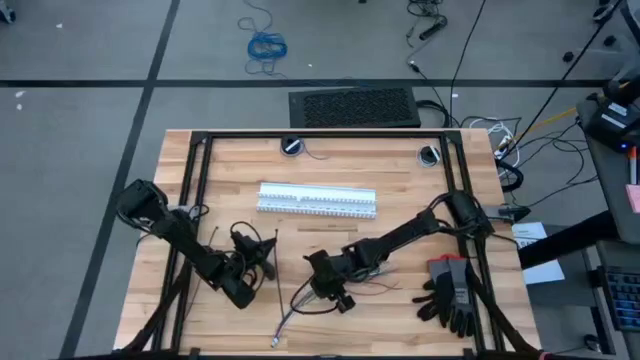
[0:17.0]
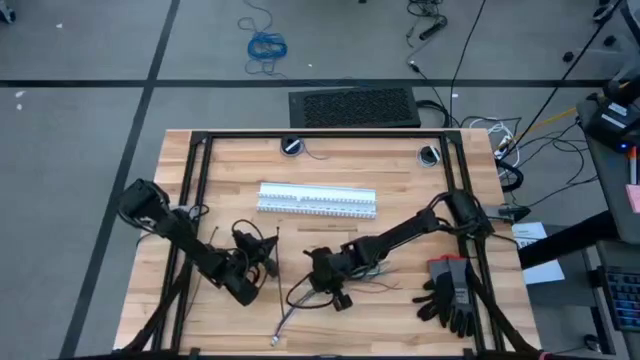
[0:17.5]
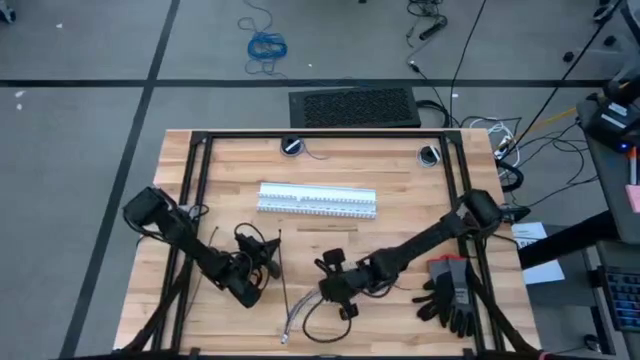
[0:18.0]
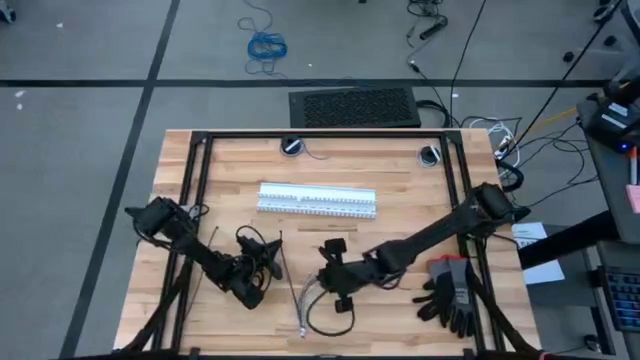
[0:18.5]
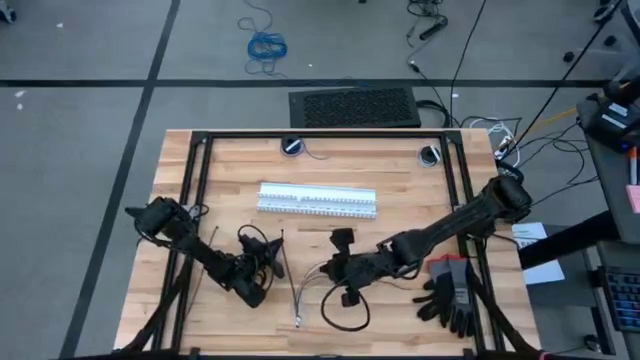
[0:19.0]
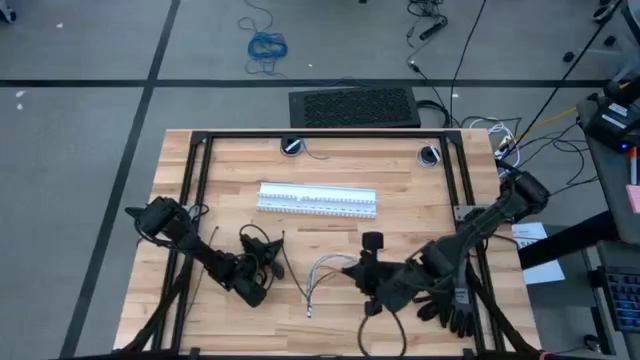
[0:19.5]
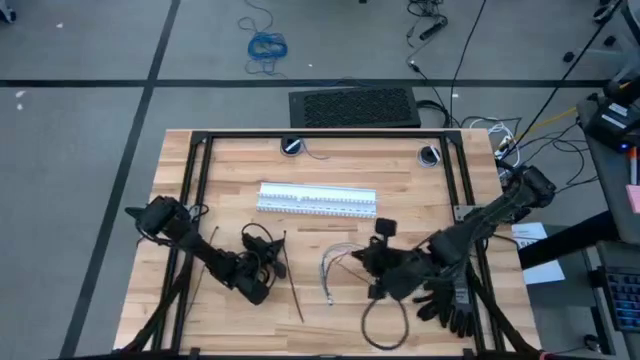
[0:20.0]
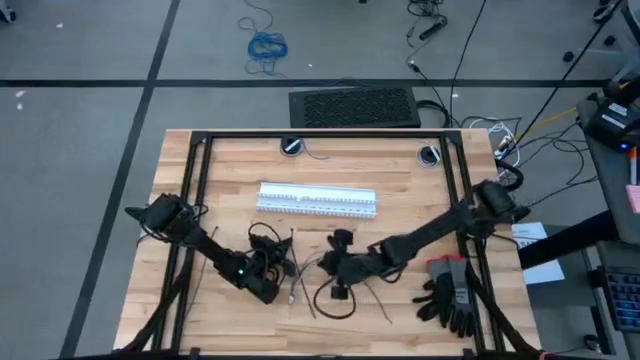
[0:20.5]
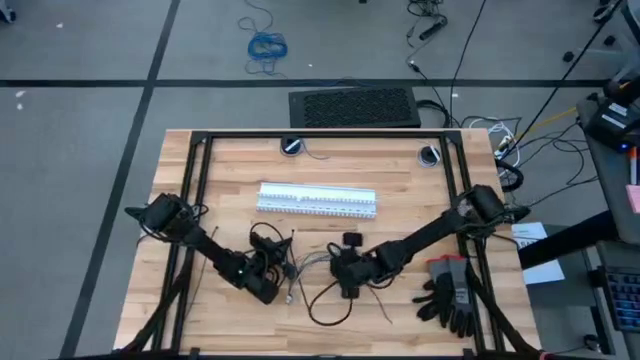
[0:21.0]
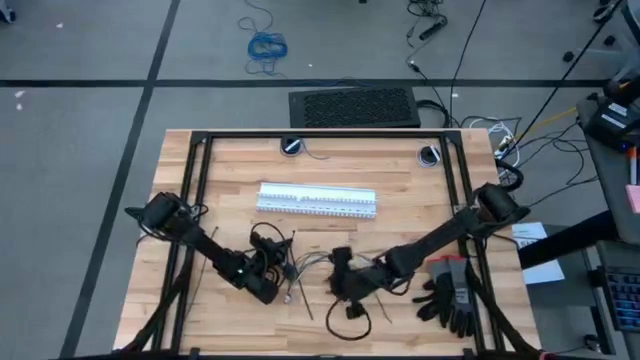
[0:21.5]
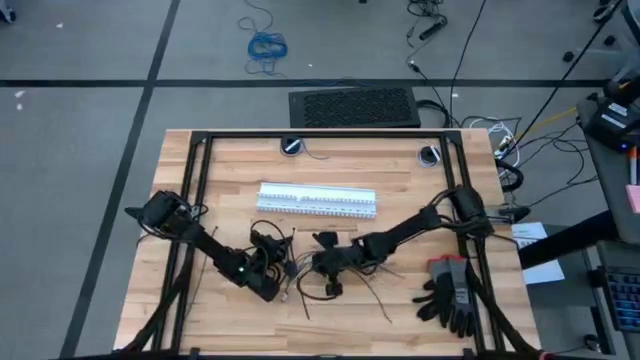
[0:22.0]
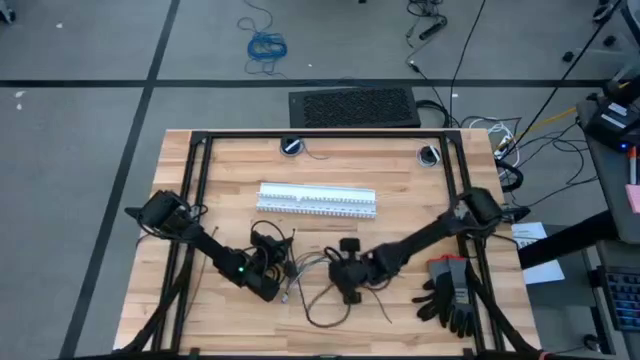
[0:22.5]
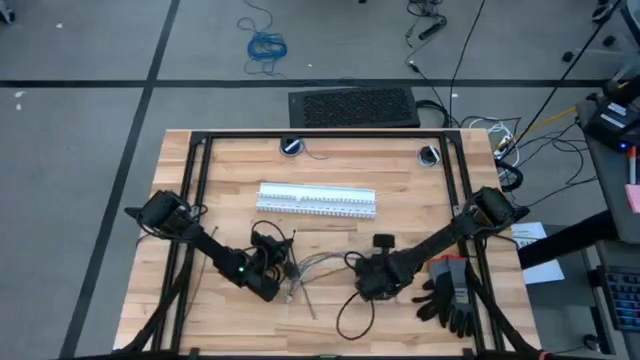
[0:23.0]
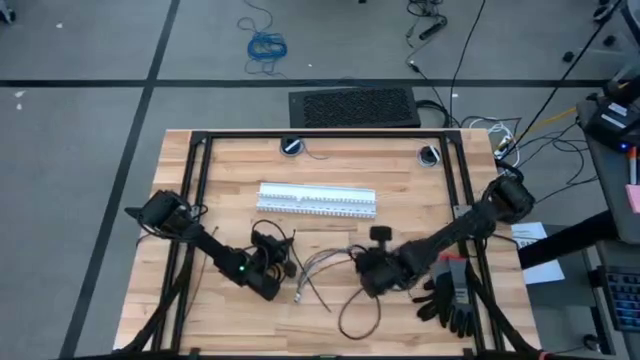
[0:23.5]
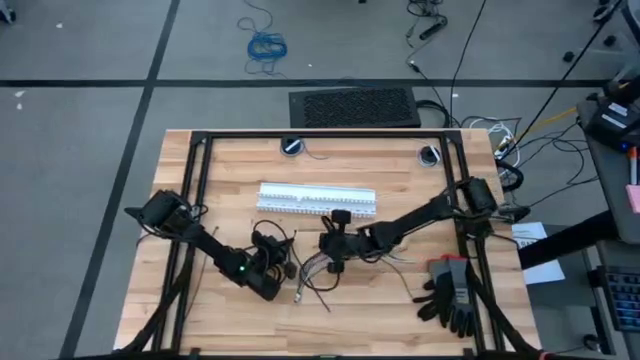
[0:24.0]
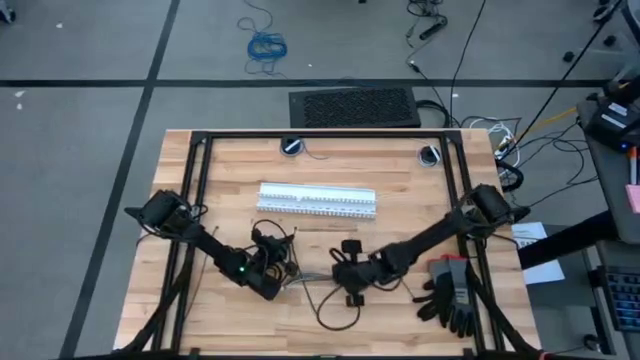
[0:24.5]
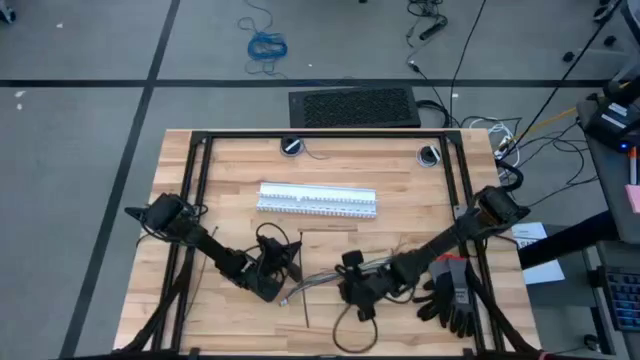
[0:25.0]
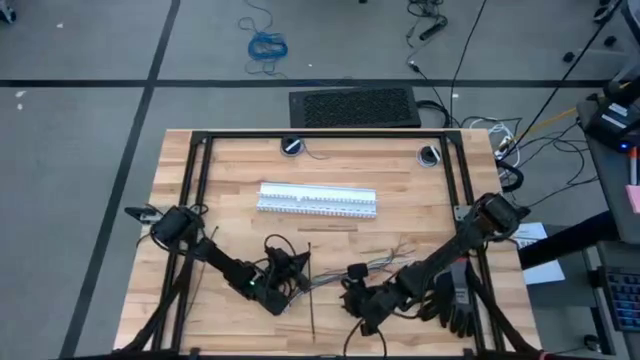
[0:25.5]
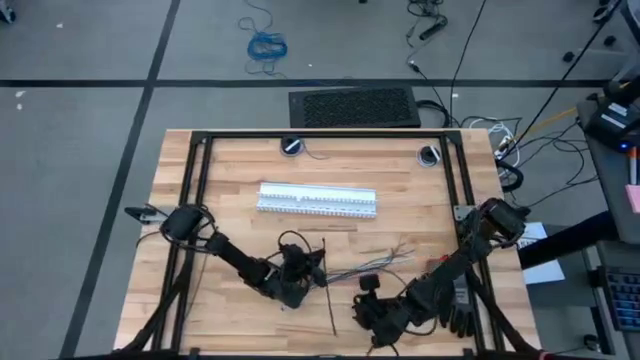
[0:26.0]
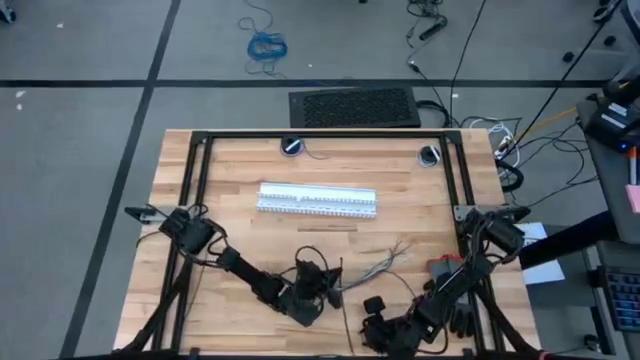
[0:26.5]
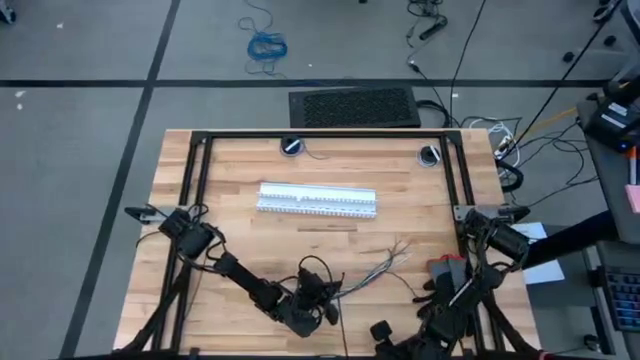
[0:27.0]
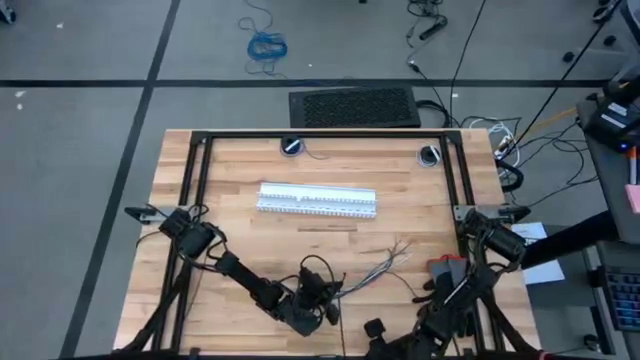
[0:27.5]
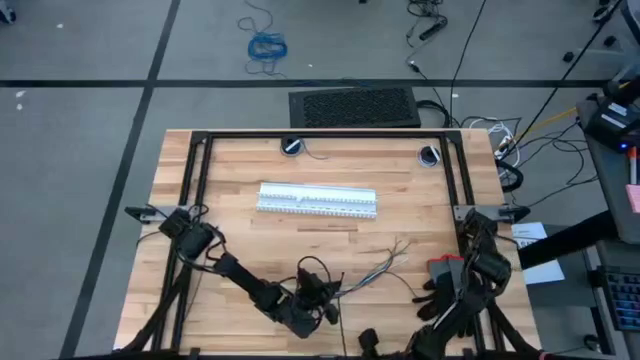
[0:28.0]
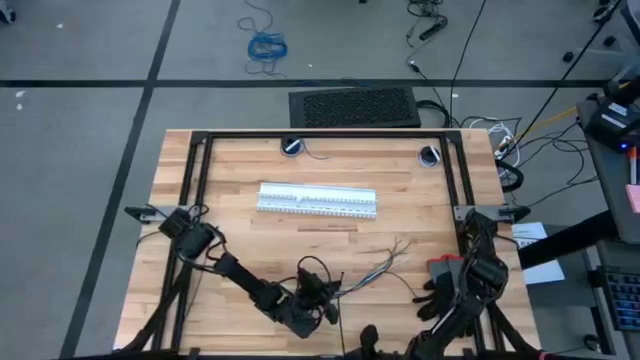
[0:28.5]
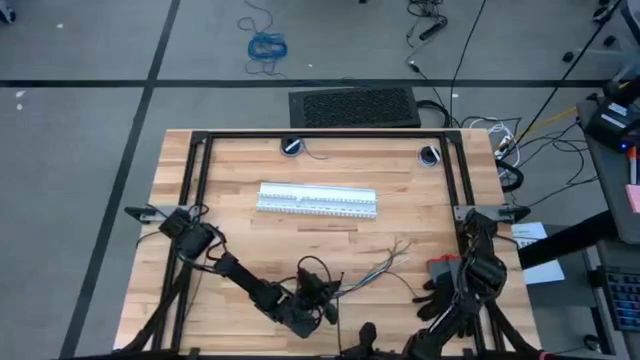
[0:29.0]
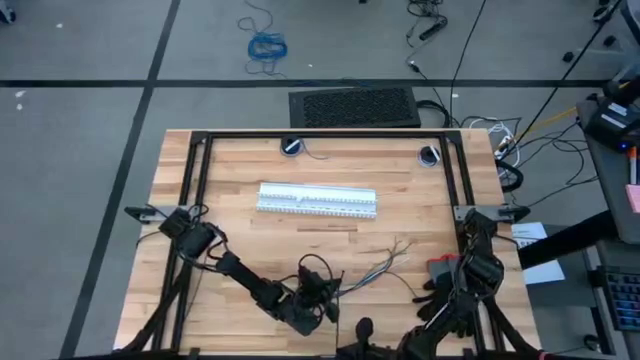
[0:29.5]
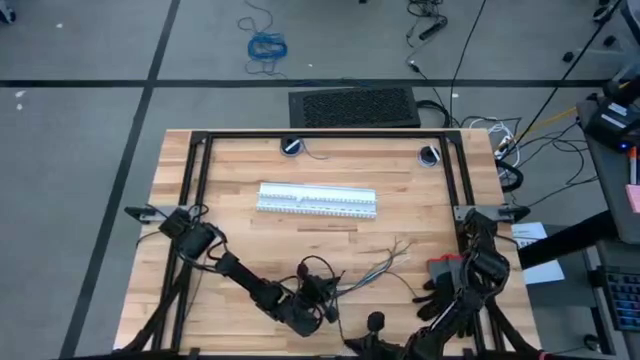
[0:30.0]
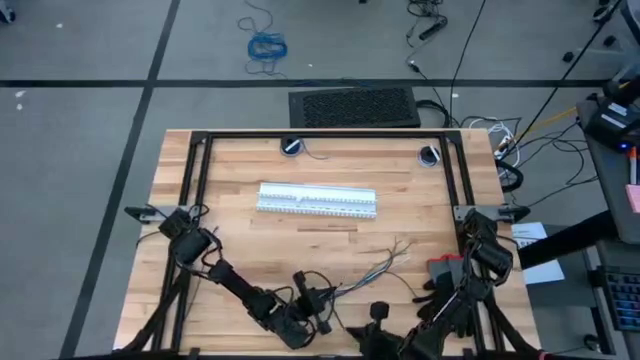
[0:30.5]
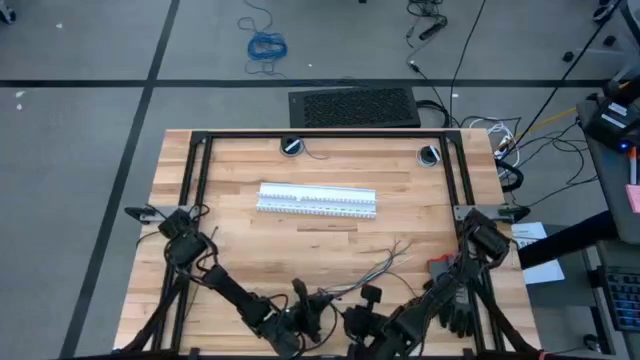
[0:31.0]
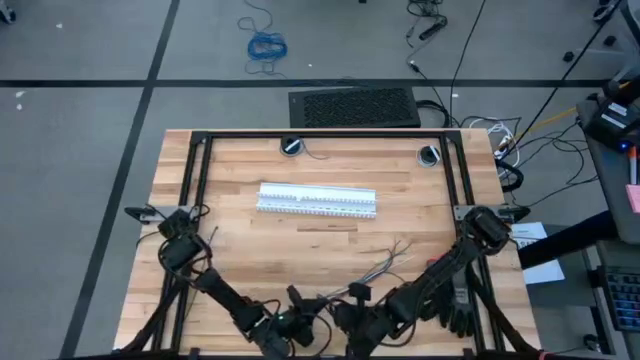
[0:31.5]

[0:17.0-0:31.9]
Task: Ziptie cables
Wrap the cables together using a zip tie

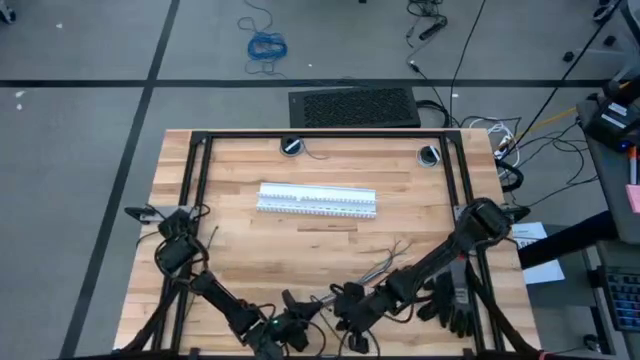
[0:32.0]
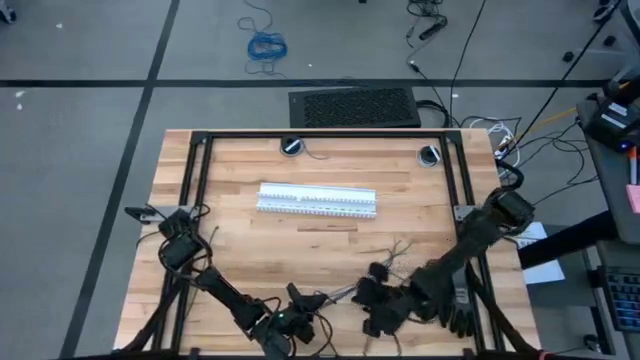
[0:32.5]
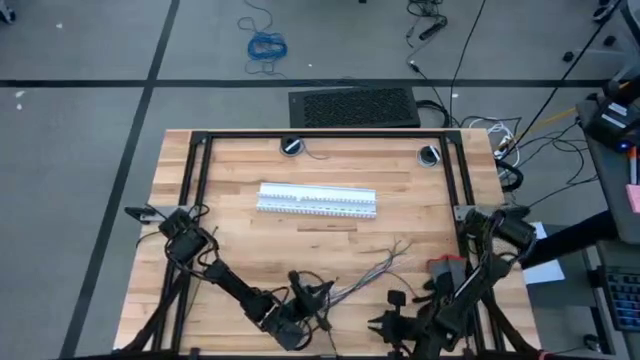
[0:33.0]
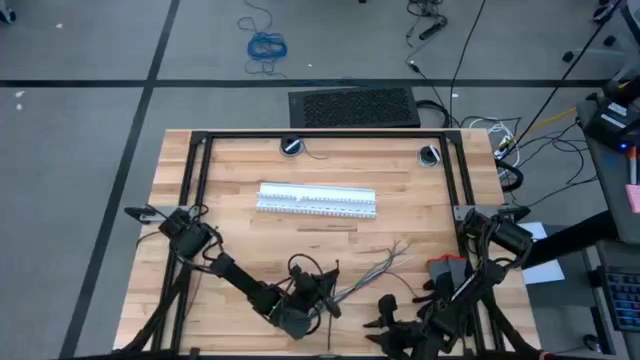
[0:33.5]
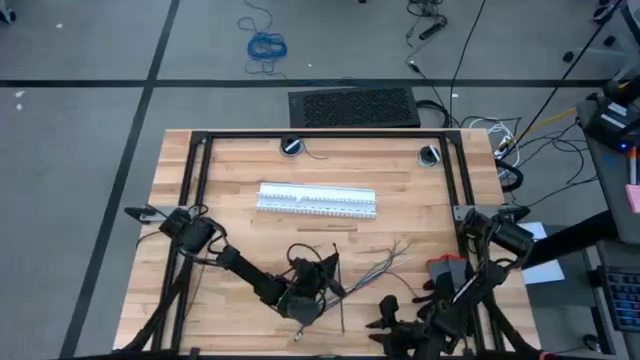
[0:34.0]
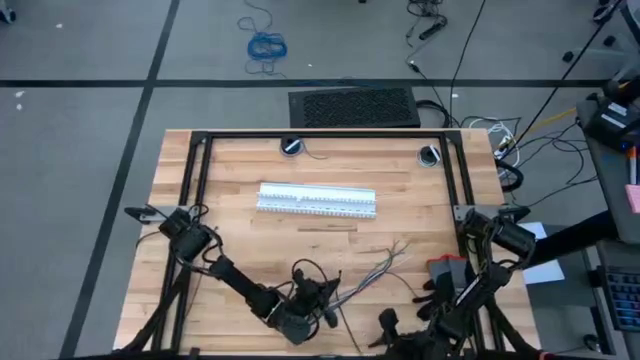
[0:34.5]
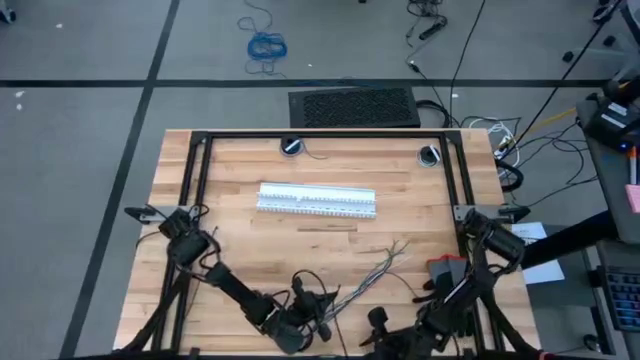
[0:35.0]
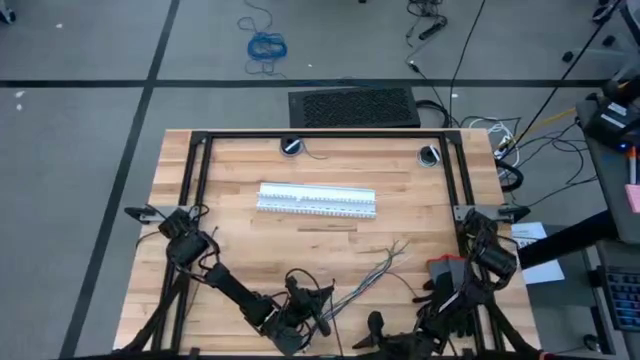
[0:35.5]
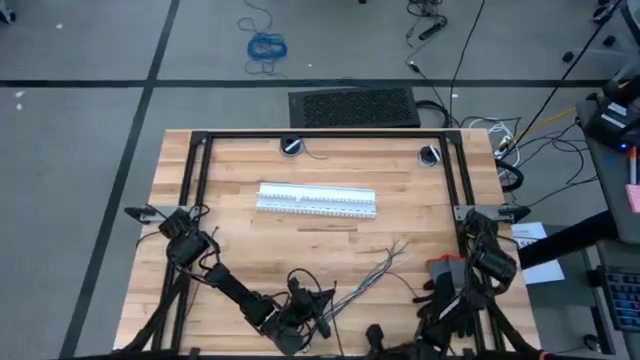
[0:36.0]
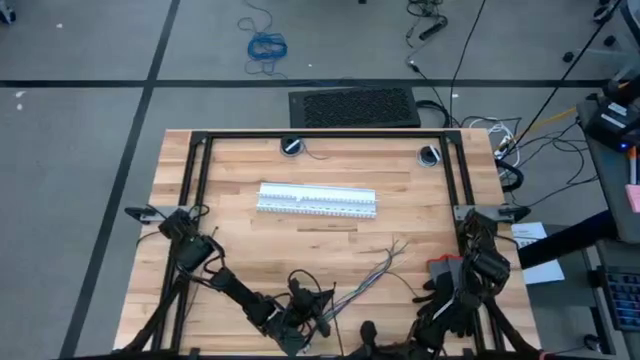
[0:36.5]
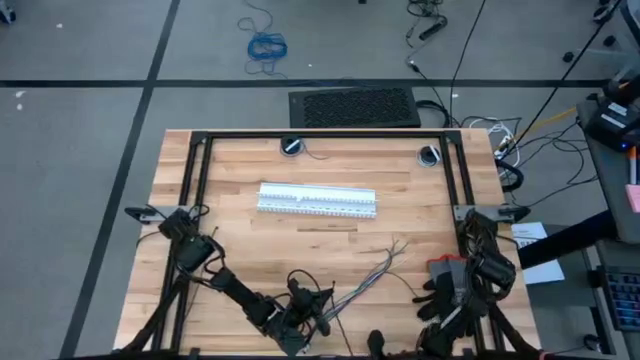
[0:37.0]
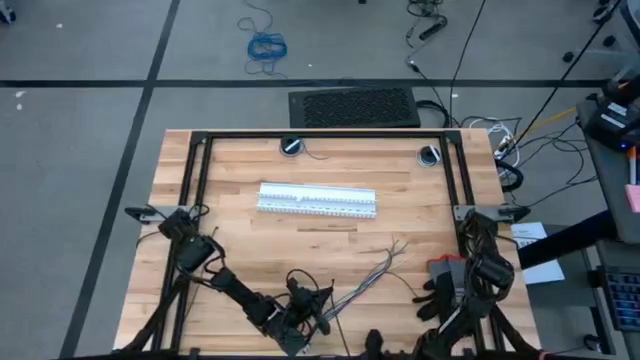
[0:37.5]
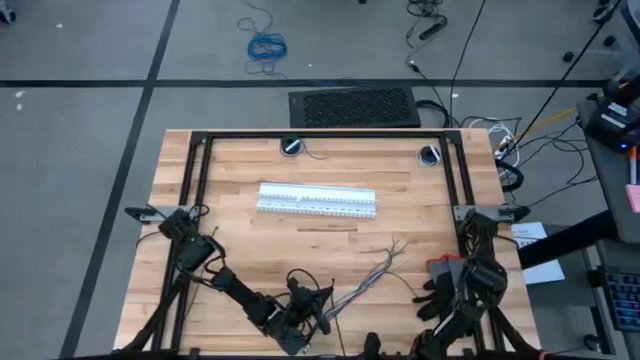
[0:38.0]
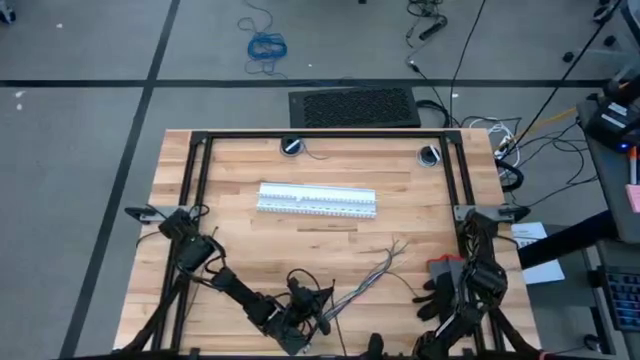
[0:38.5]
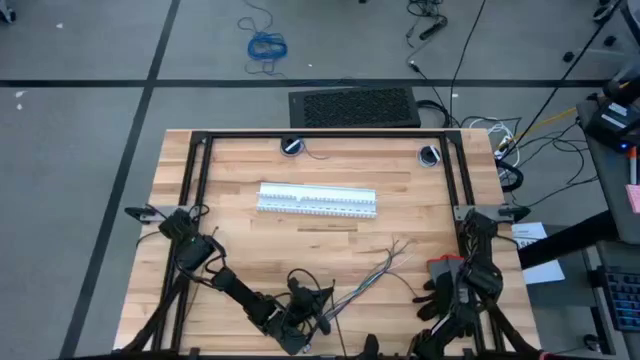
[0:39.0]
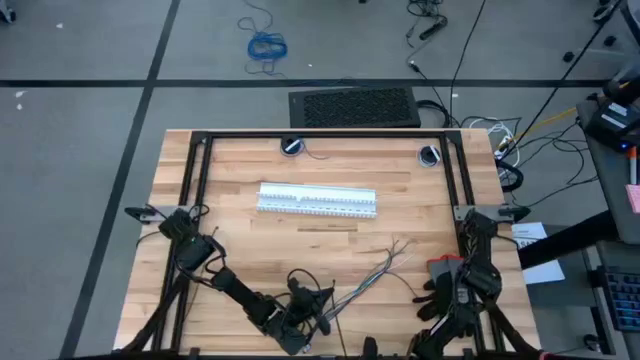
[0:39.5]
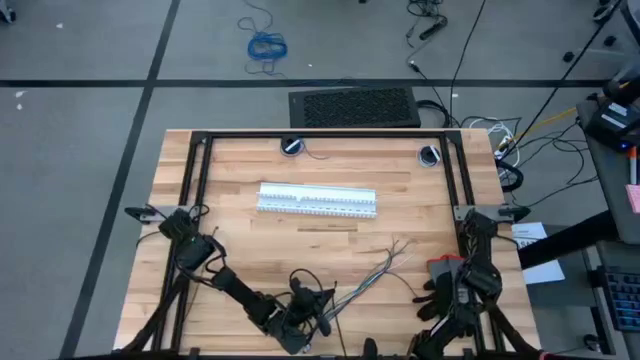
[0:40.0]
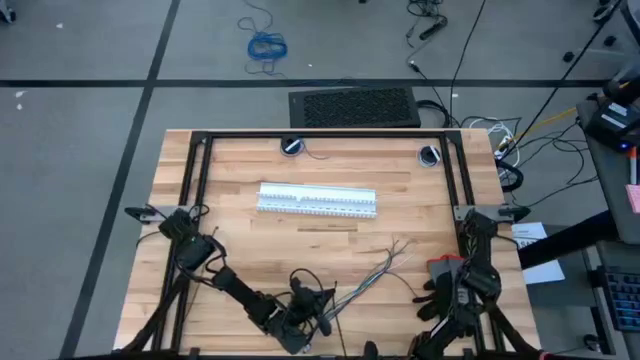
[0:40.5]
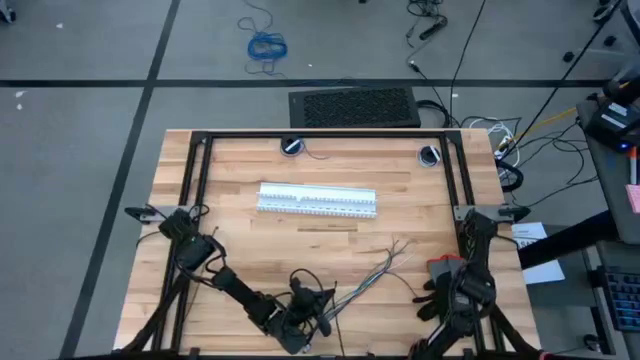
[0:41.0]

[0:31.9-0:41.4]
Wrap the cables together using a zip tie
